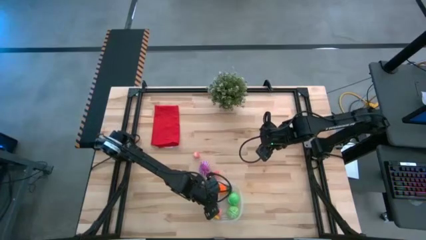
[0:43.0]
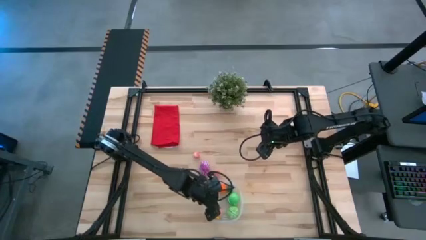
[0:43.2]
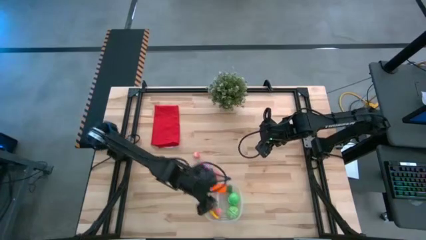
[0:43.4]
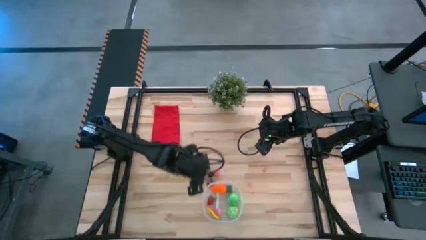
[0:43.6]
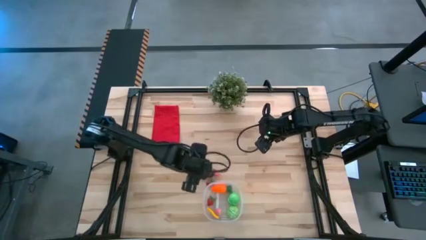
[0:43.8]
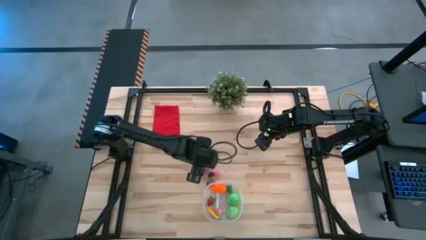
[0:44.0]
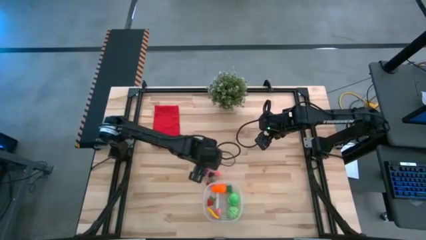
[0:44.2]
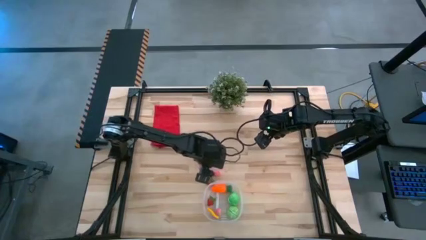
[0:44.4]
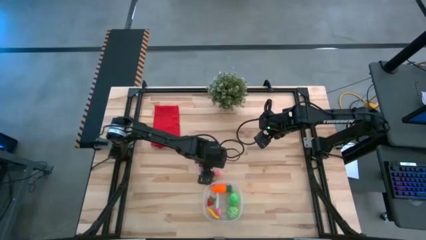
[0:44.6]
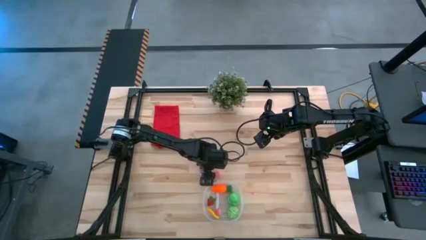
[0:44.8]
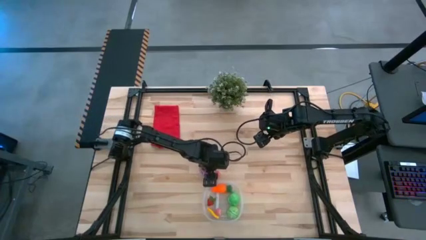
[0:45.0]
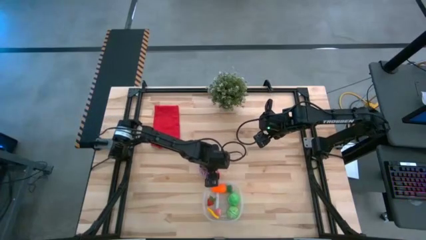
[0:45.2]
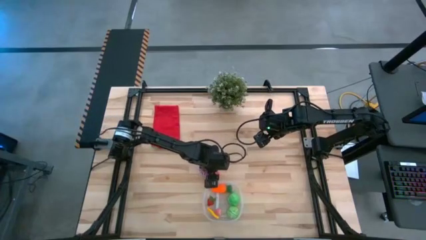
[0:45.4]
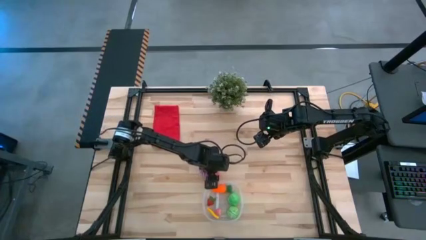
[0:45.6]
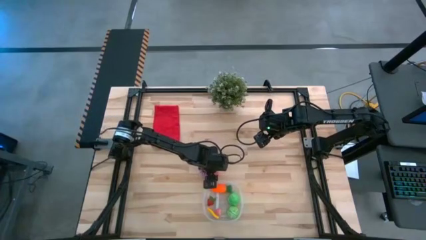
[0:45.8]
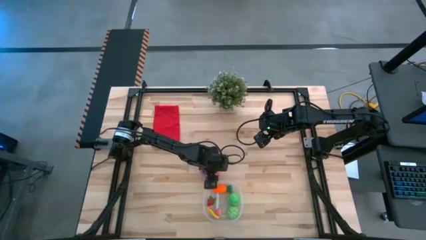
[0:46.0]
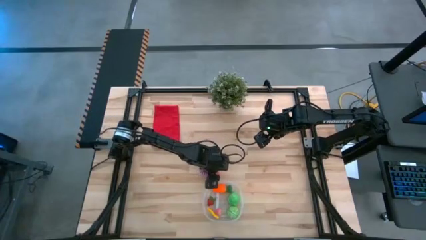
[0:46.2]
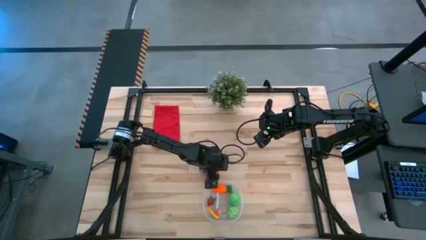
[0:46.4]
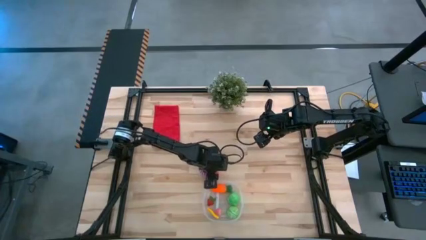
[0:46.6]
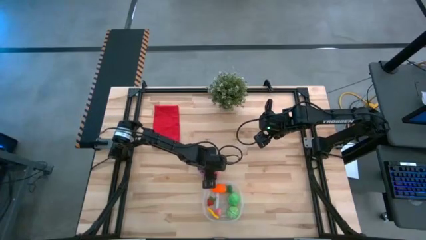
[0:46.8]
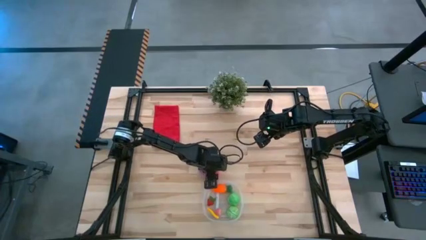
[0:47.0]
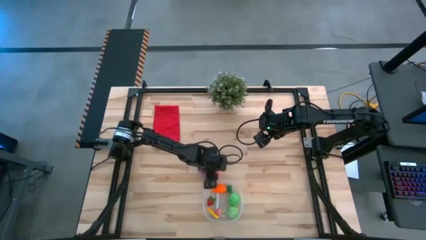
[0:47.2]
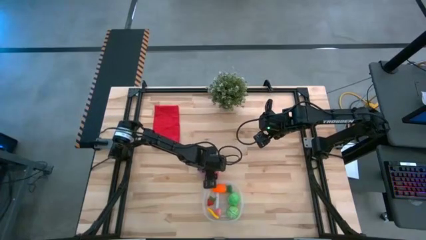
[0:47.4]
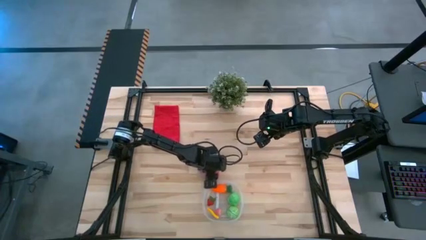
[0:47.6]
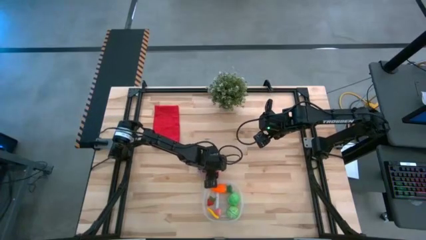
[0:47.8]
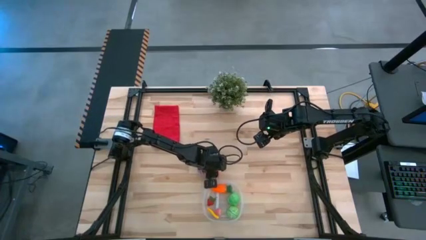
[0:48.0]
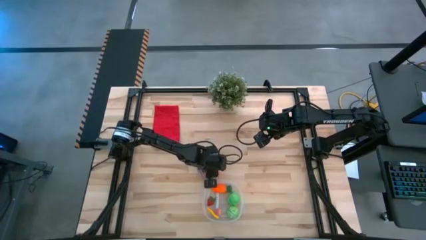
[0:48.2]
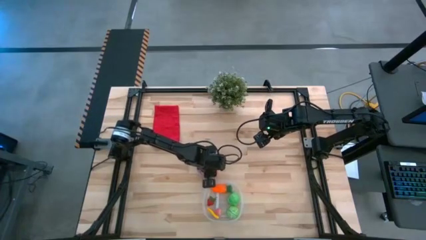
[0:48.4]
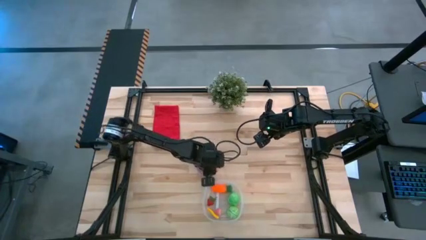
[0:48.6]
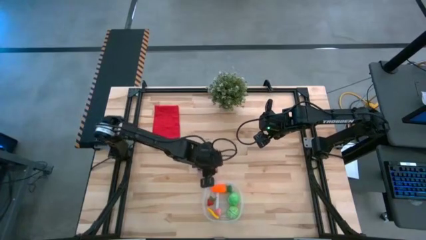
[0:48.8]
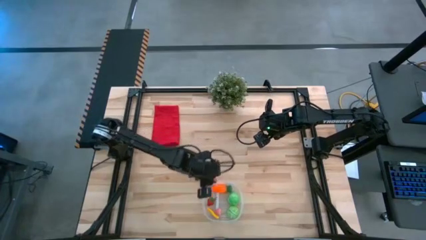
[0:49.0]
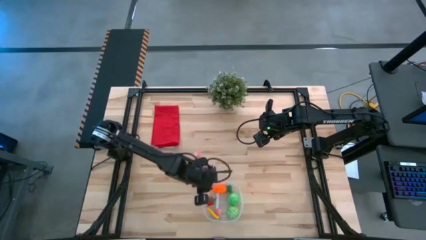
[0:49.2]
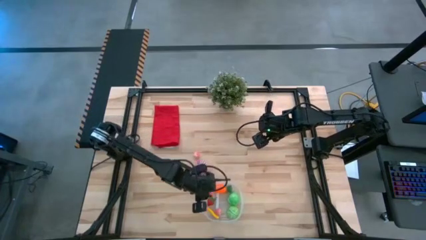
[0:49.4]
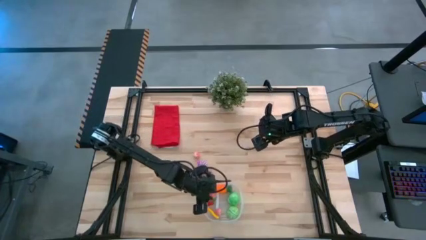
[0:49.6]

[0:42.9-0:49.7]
Task: Pick and placing Produce into tupperware
Put the bottom pink peach into the transparent bin

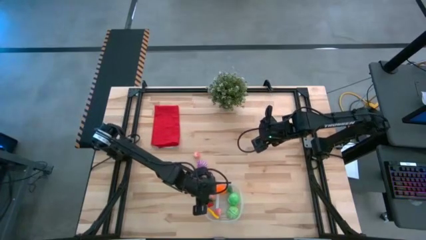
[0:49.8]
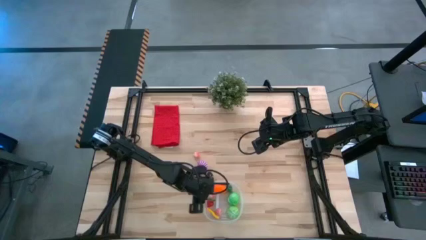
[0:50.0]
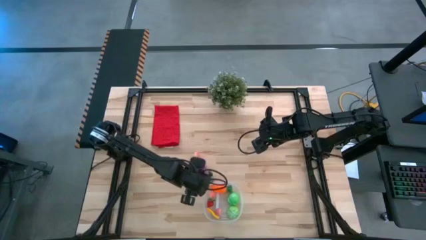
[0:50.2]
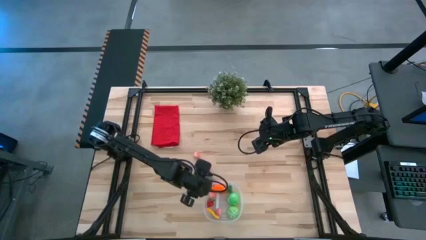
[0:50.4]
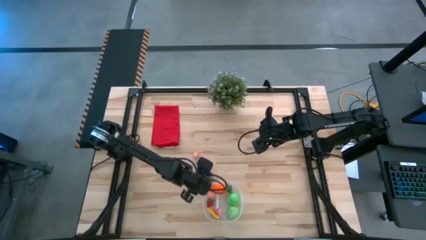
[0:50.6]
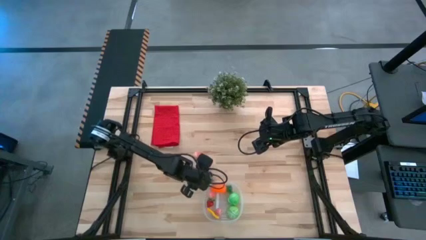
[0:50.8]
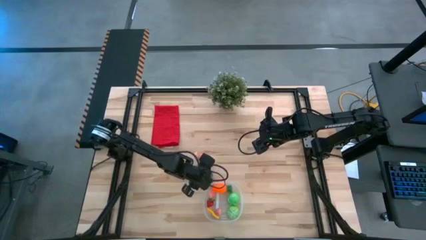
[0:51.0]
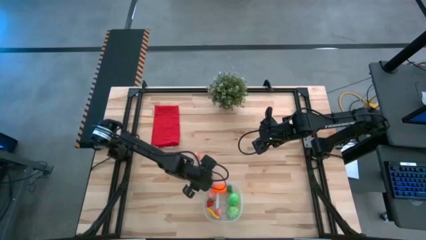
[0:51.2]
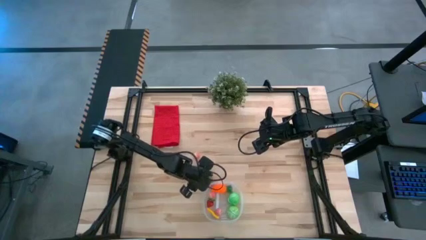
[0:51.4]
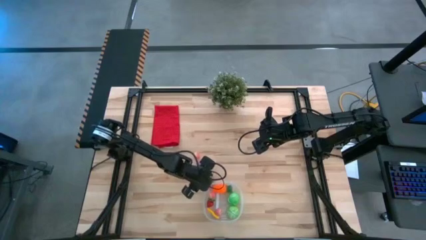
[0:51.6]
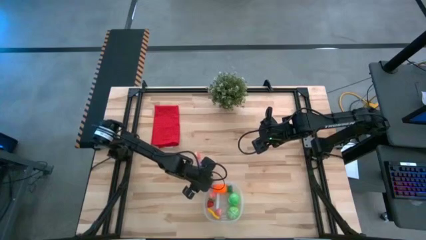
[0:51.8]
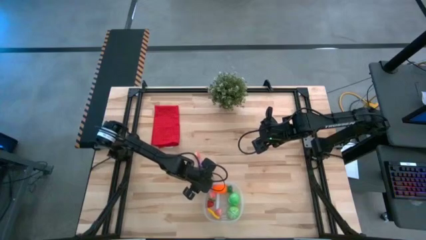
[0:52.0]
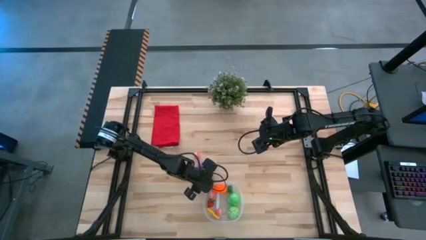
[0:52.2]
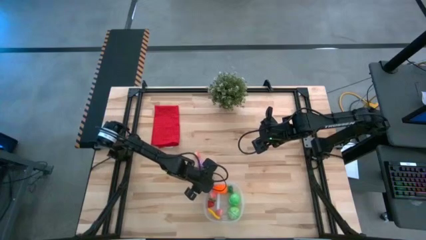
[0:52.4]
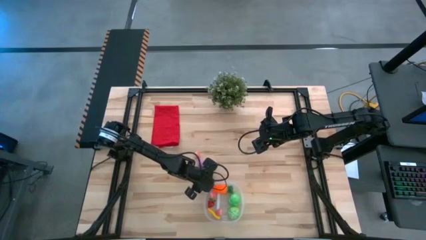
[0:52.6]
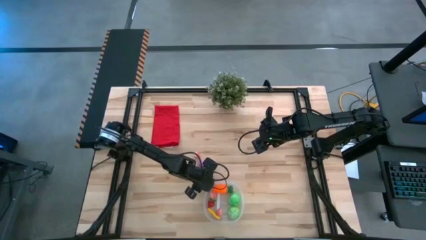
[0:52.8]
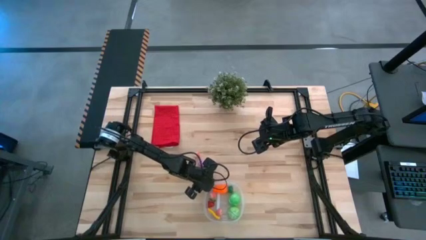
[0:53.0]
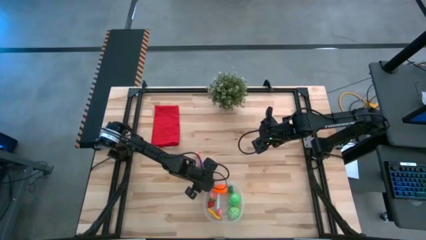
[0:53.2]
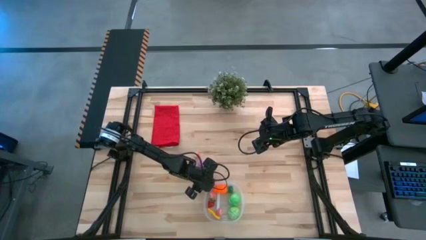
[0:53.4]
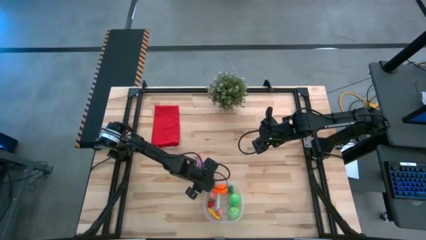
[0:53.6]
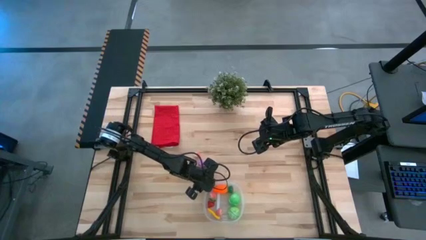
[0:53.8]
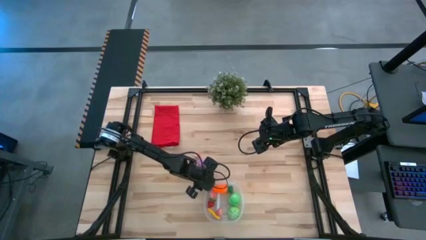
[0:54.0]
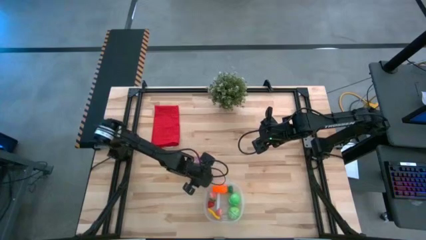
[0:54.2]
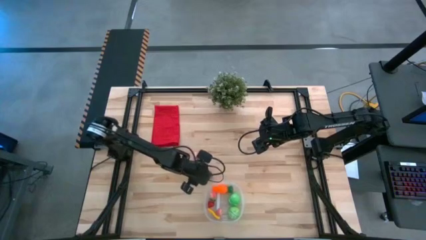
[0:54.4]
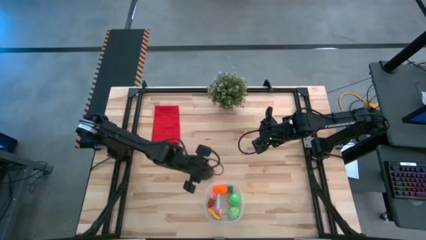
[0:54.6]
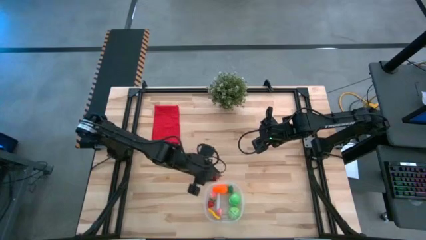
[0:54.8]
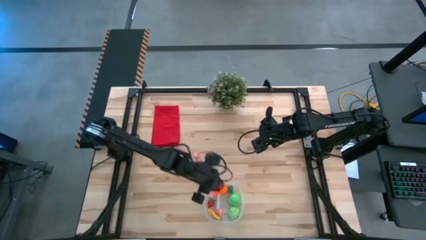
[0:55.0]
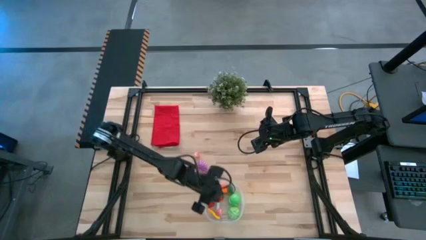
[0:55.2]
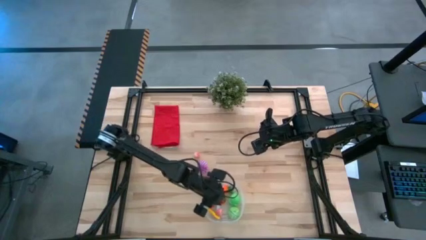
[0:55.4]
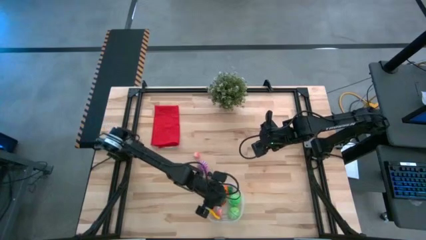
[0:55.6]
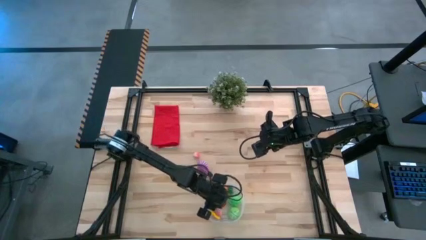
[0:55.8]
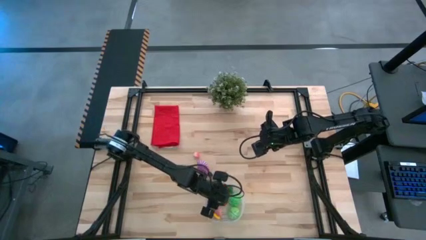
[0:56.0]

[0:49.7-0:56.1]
Put the red strawberry into the transparent bin

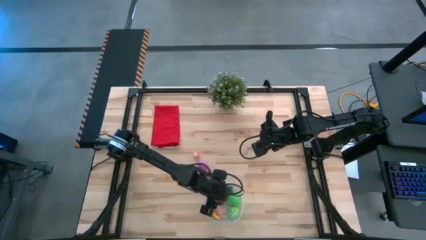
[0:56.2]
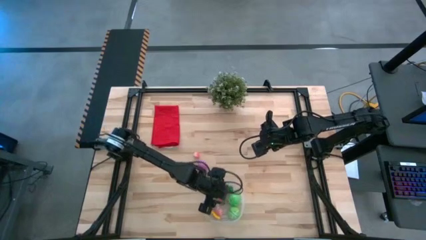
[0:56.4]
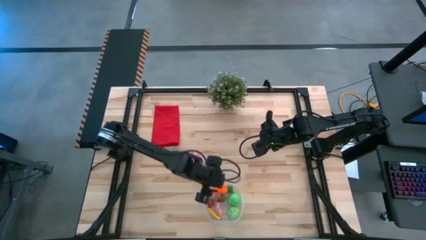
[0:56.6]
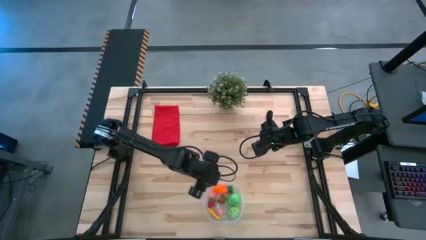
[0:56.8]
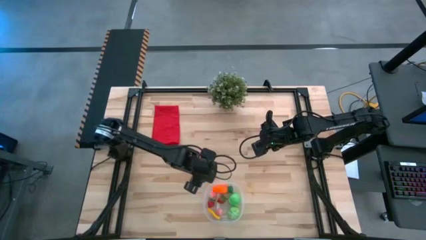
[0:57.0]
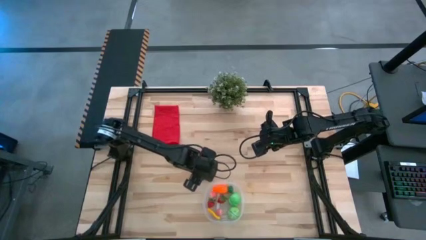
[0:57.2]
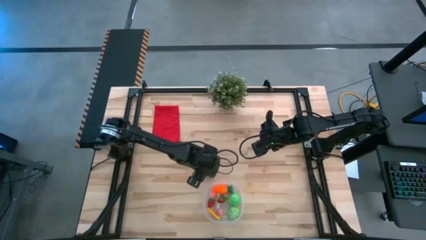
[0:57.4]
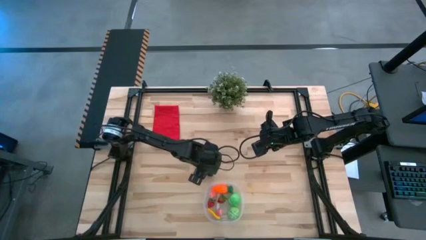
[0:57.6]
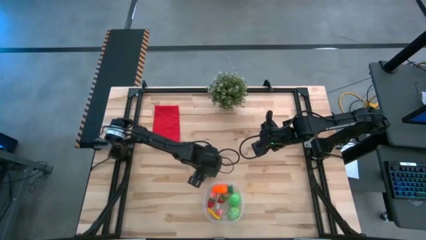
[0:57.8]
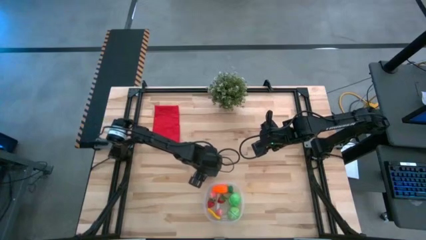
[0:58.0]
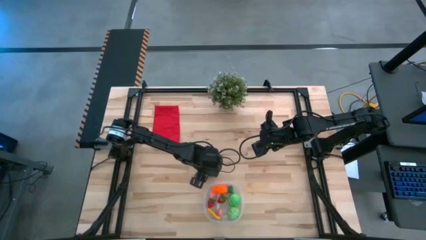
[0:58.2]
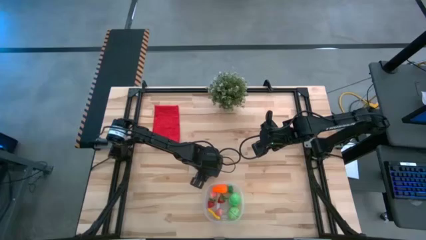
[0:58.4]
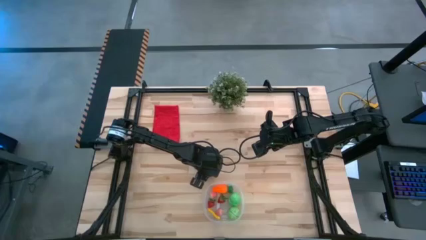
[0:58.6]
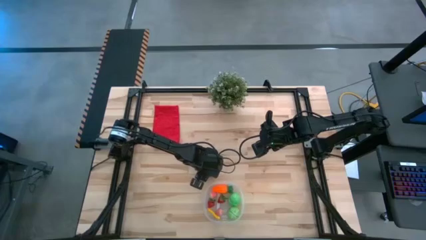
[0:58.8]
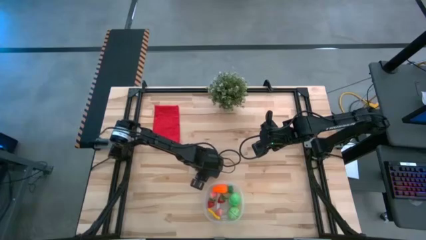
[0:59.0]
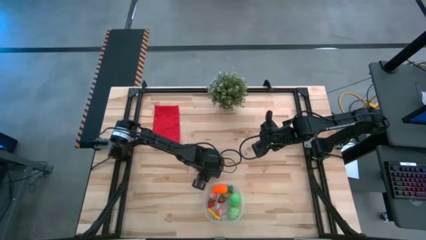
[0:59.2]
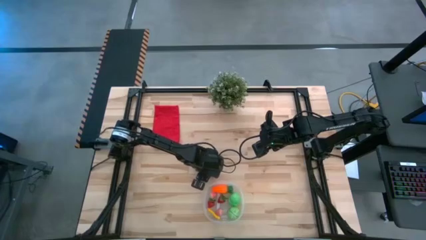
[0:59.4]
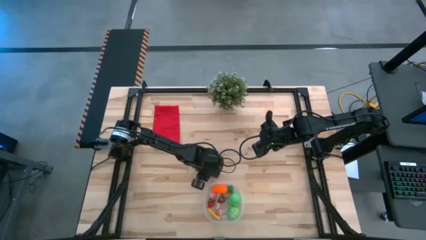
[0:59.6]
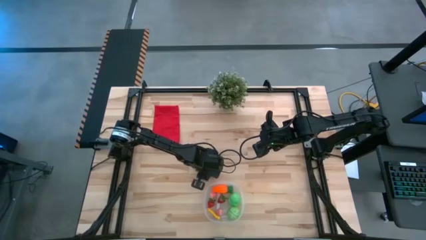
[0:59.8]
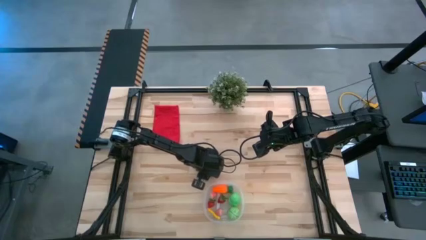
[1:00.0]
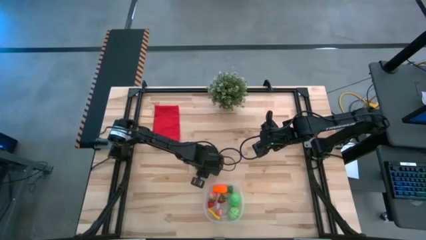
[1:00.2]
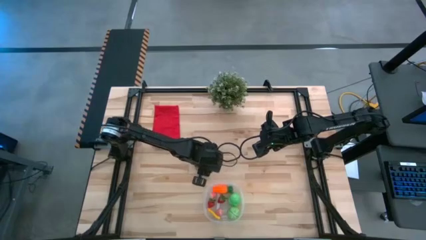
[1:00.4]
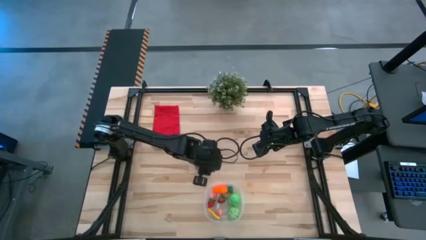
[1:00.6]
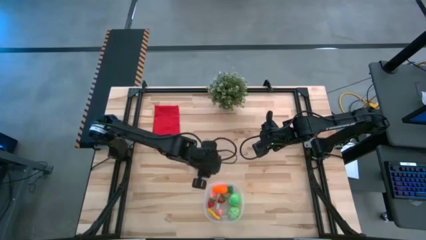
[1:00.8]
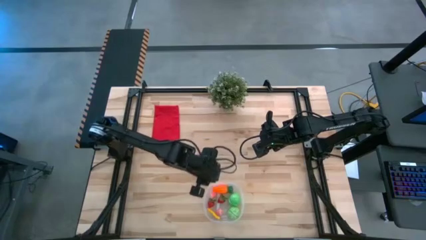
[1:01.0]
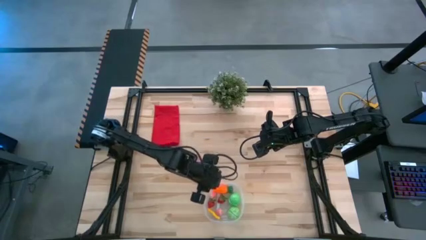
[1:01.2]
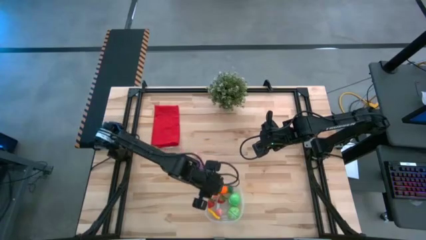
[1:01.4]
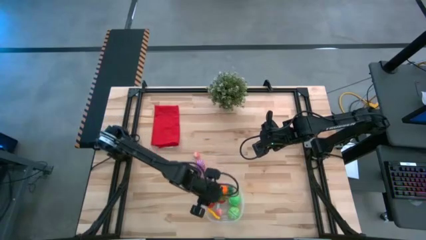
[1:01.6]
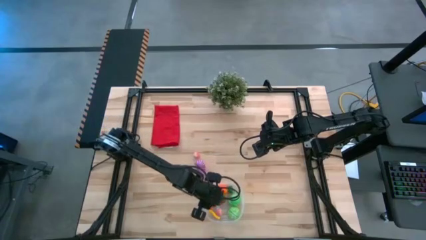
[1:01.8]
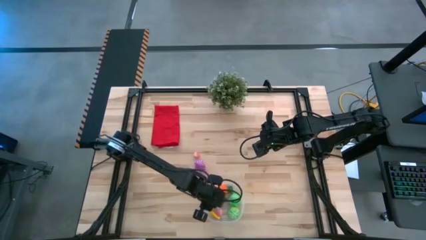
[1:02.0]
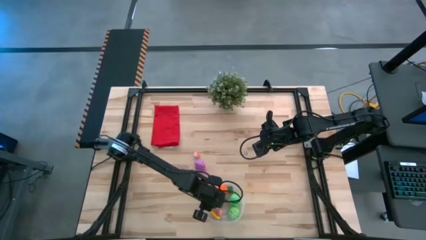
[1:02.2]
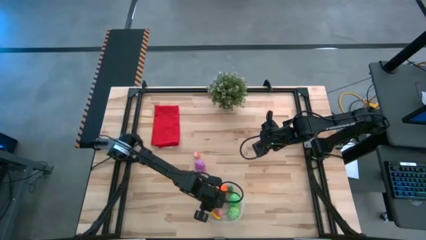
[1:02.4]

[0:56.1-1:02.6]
Put the blackberry into the transparent bin
